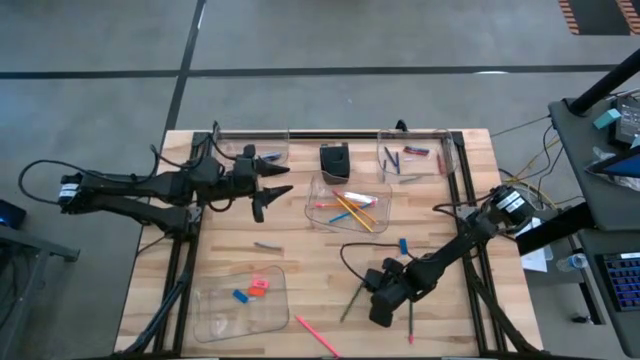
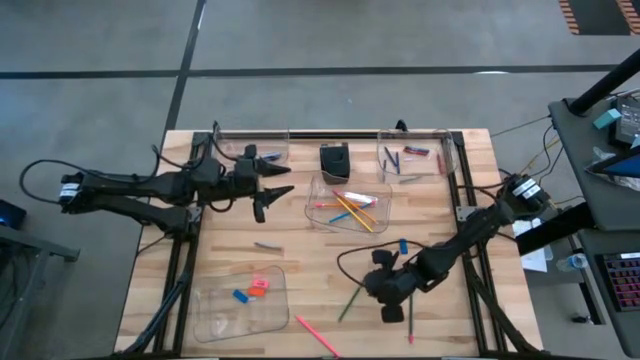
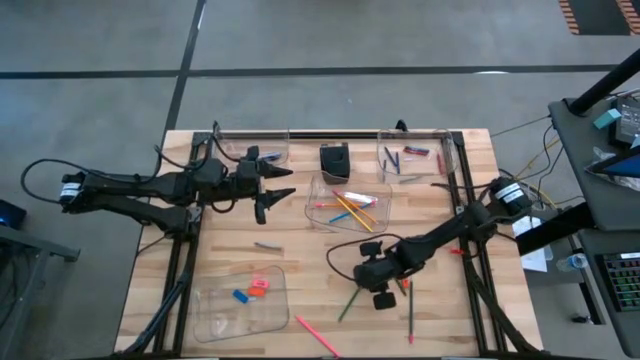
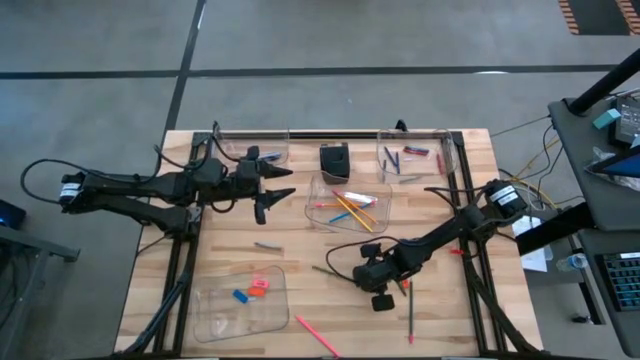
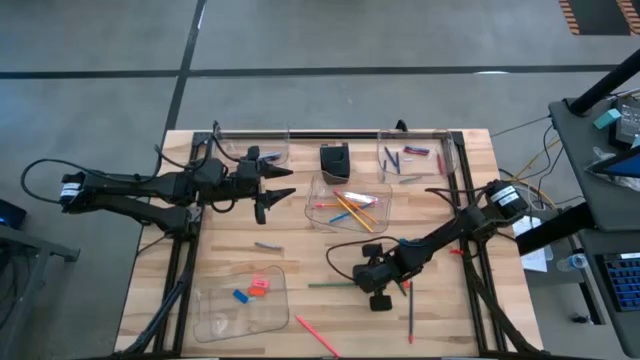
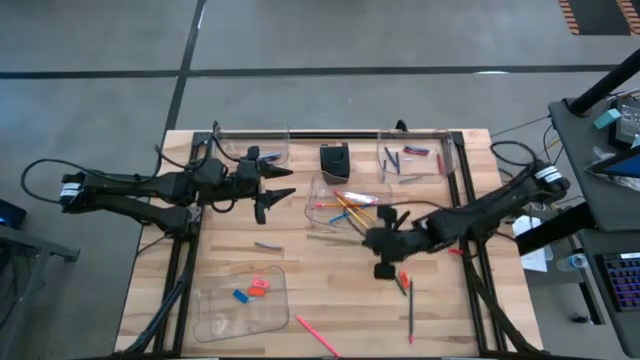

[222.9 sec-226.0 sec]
Task: Sort crayons/erasers/pens/pencils in bins
Put the green pencil into the middle transparent bin

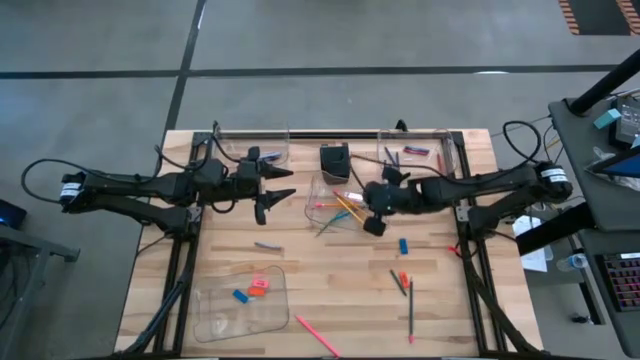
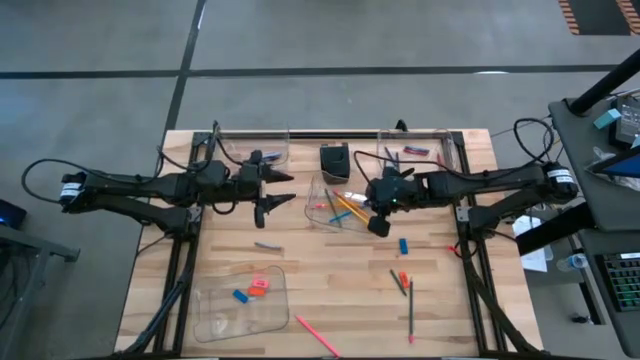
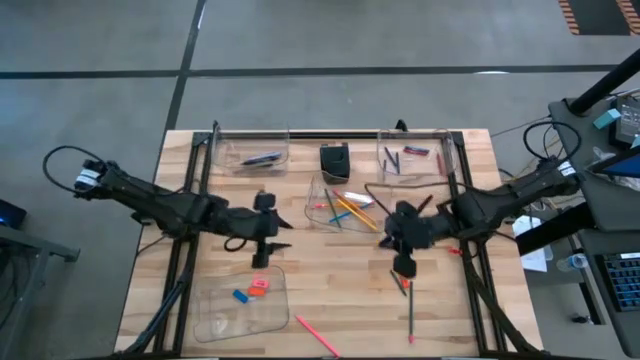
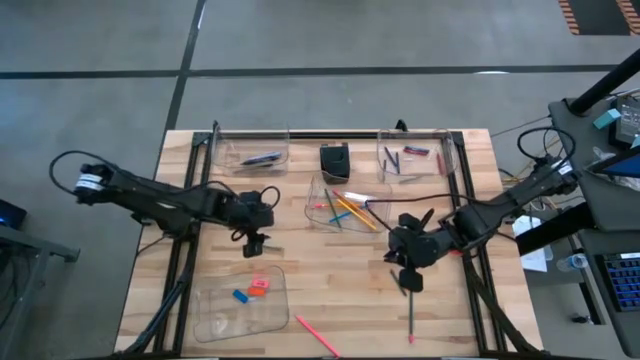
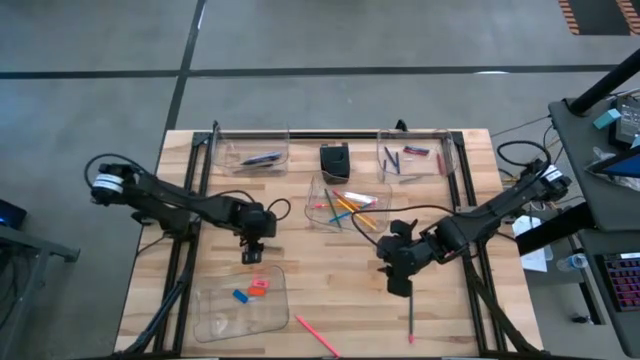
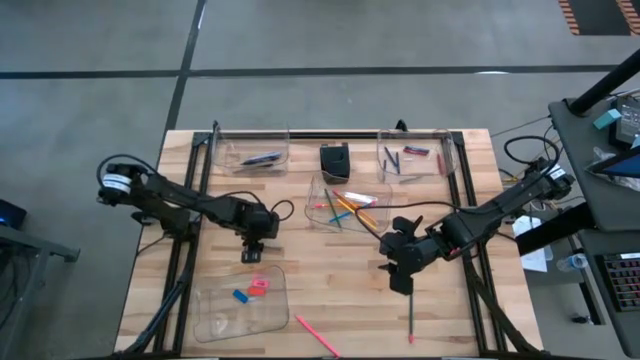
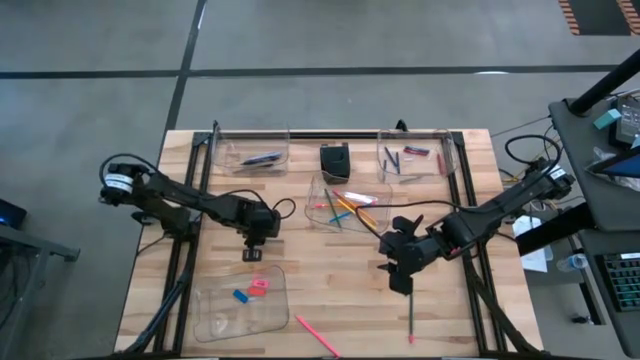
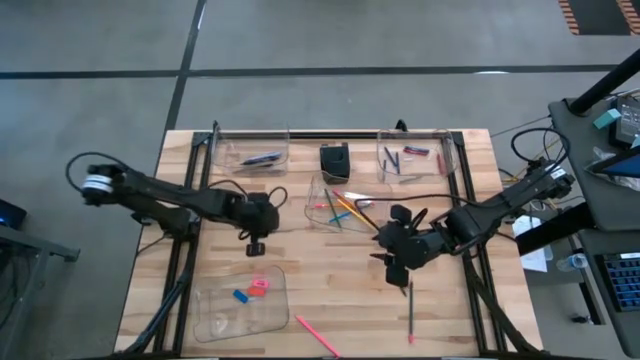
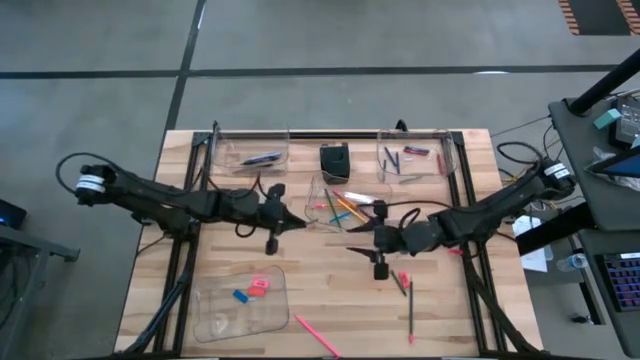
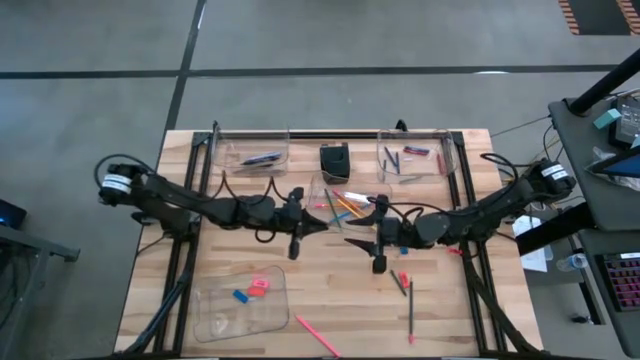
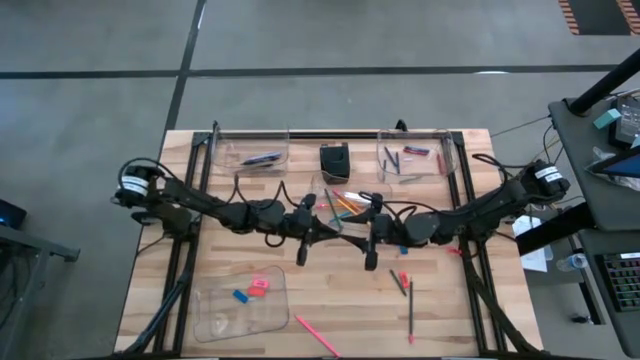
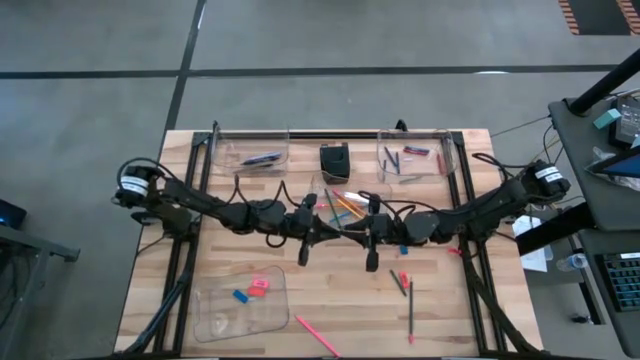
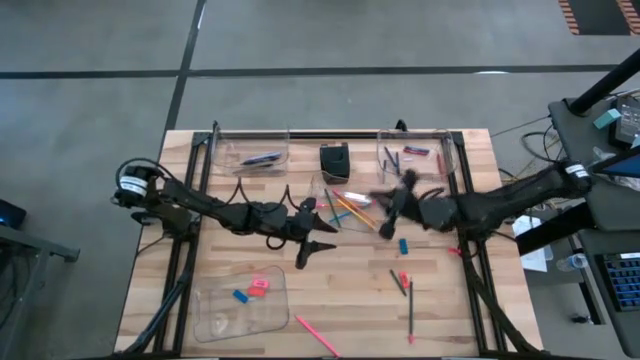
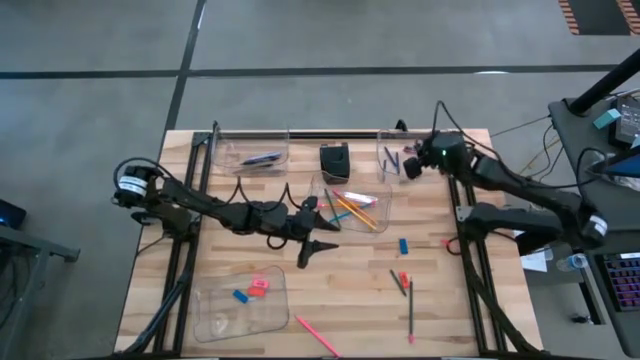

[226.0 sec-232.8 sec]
Put the gray crayon into the top right transparent bin

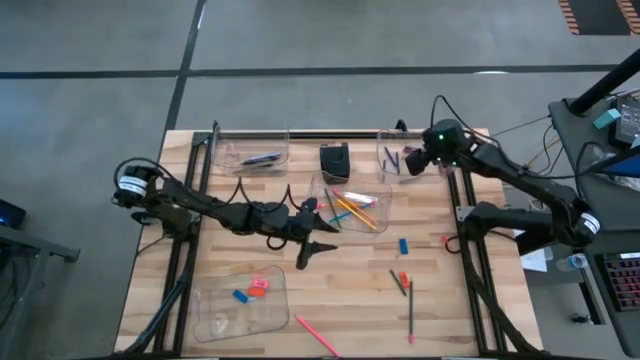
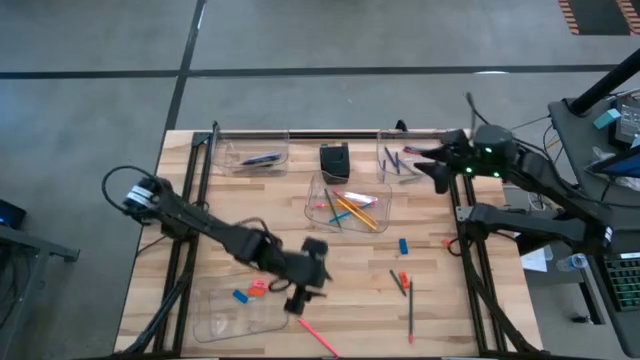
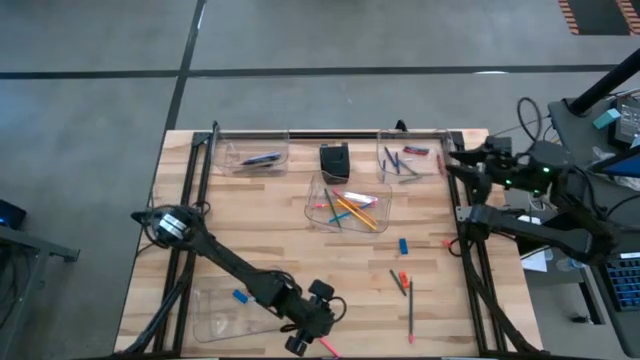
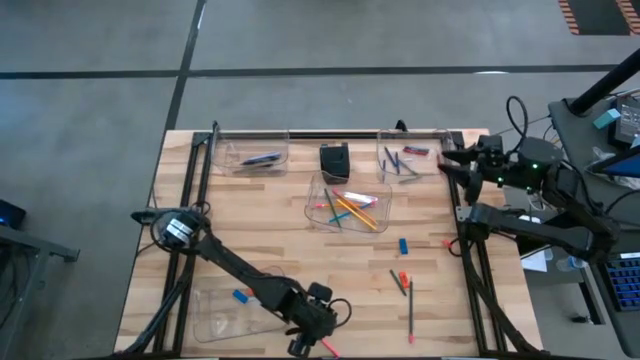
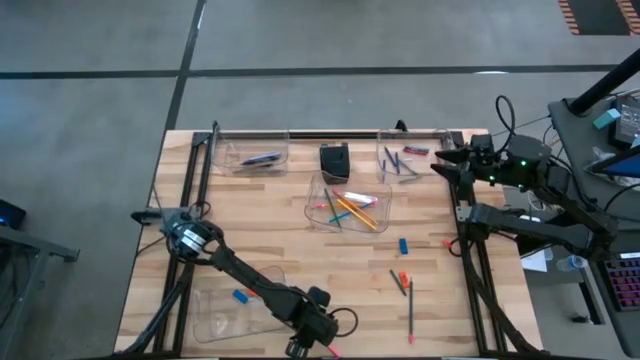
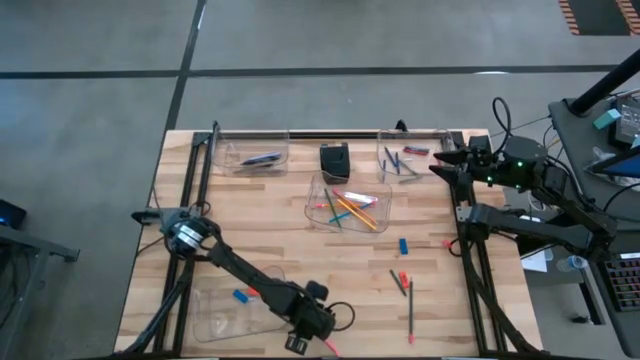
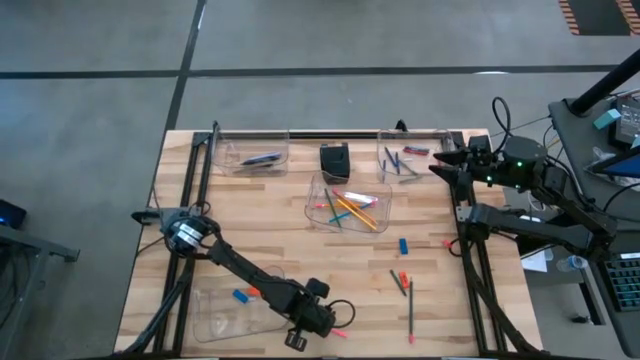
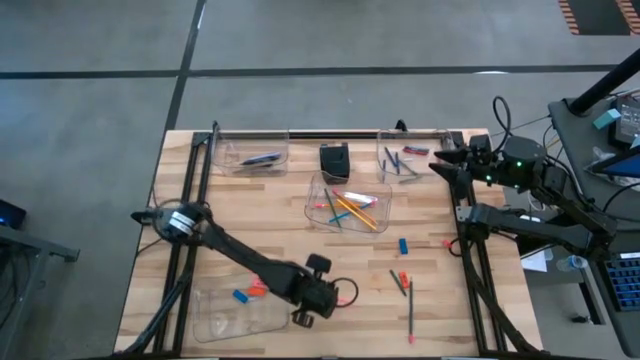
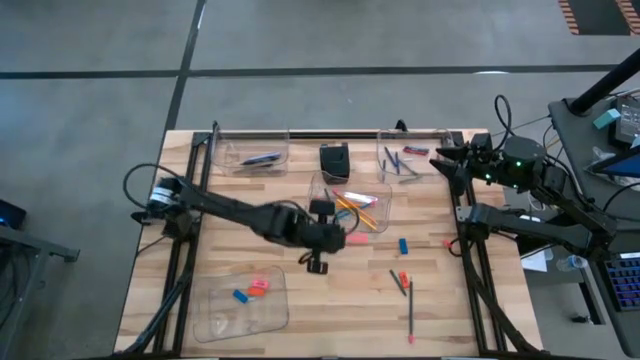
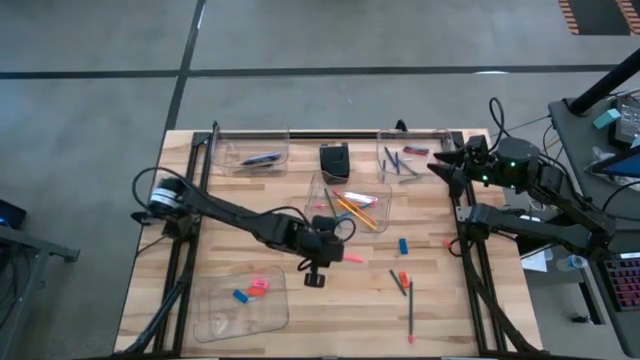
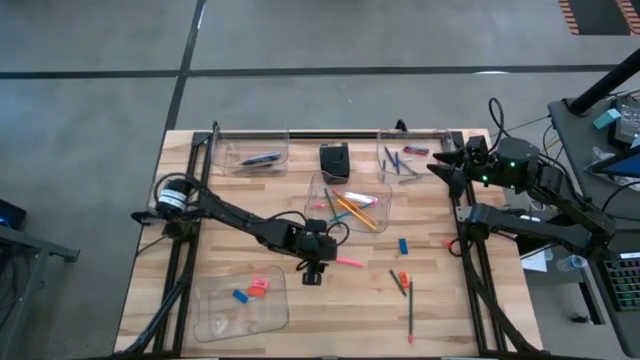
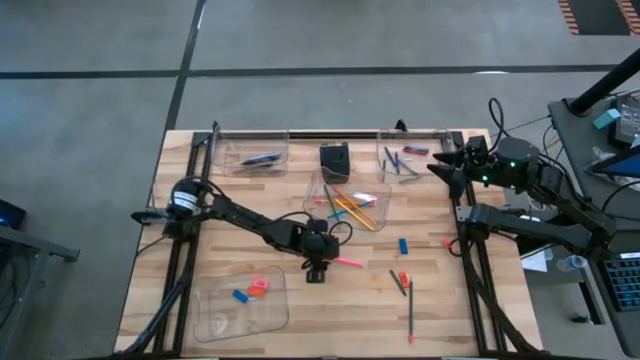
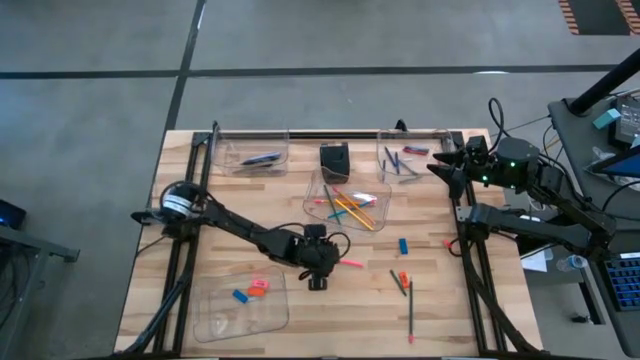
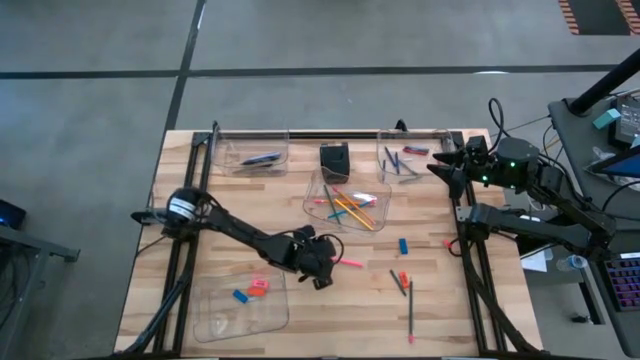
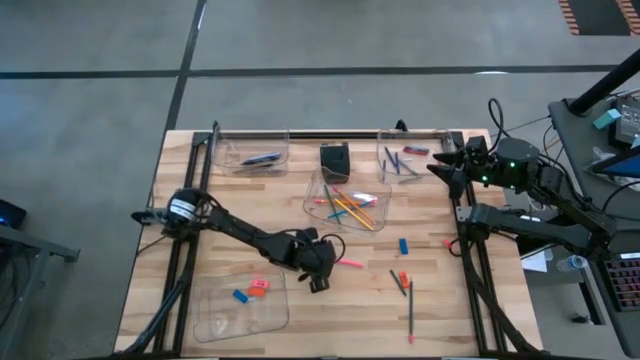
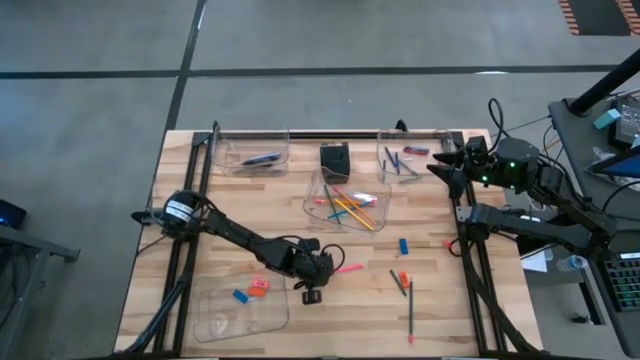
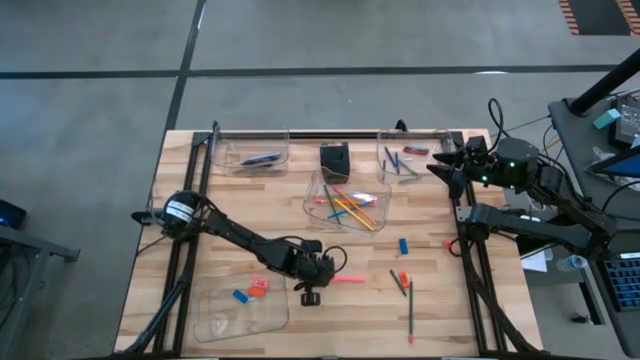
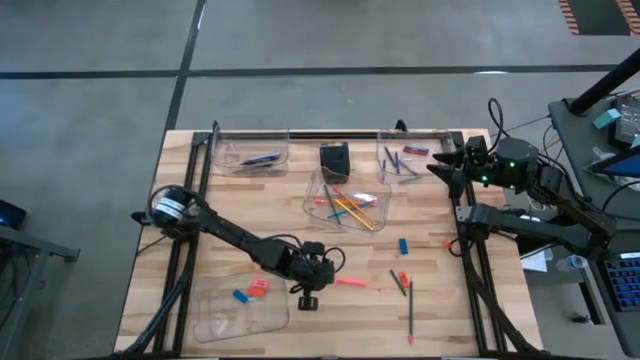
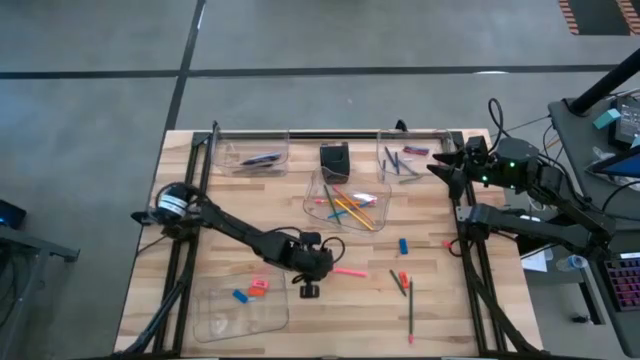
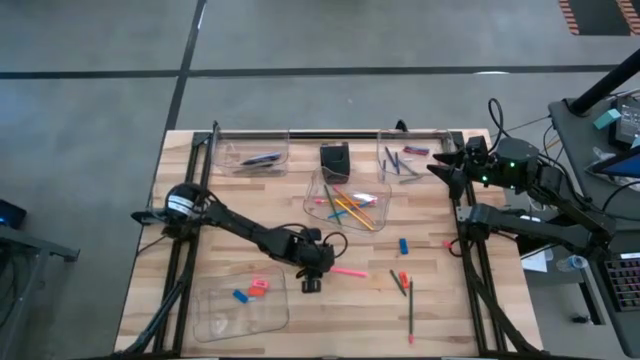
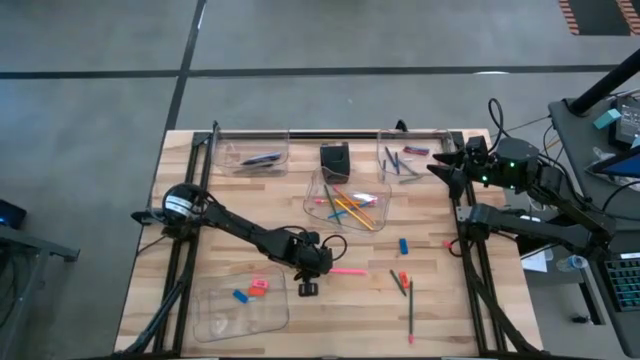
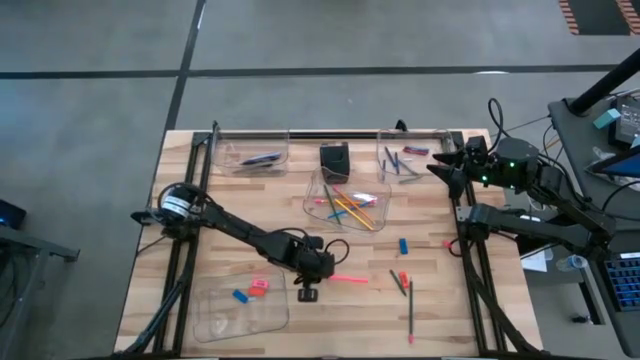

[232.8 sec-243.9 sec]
Put the pink pencil into the middle transparent bin
